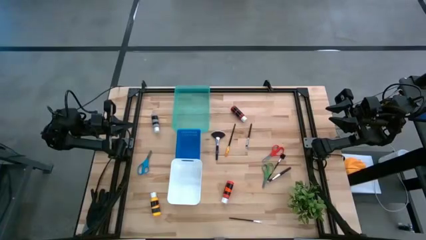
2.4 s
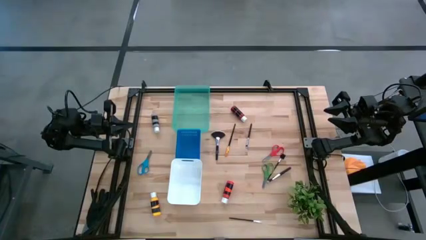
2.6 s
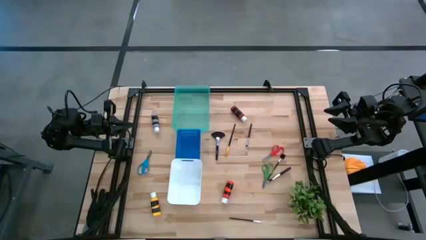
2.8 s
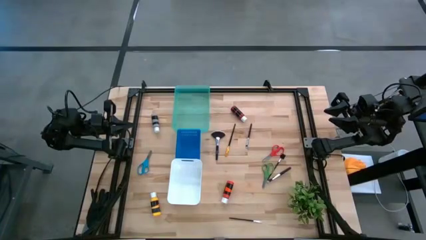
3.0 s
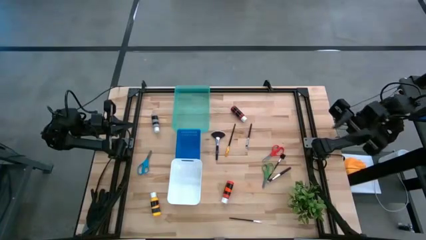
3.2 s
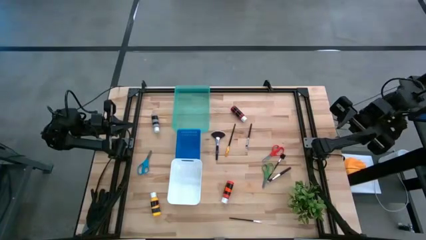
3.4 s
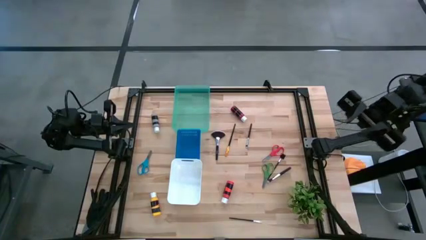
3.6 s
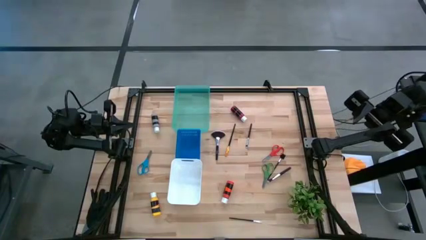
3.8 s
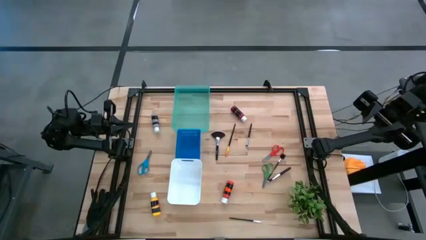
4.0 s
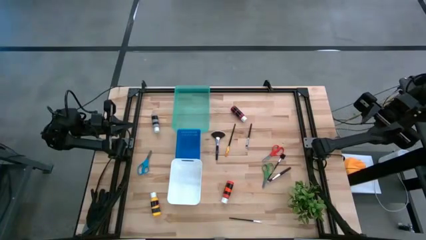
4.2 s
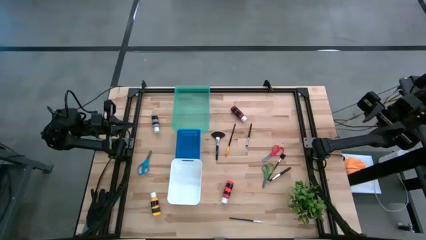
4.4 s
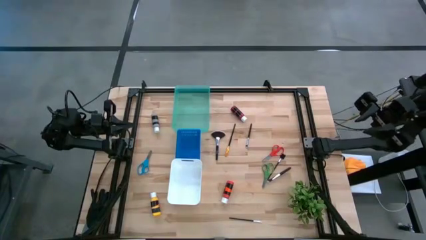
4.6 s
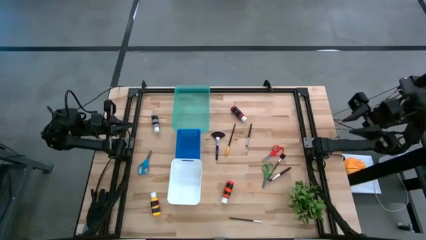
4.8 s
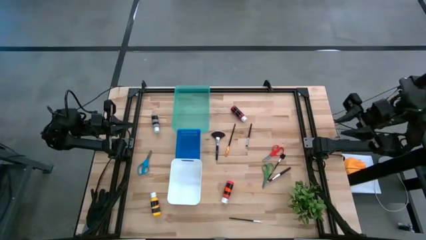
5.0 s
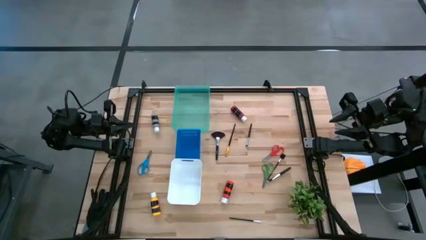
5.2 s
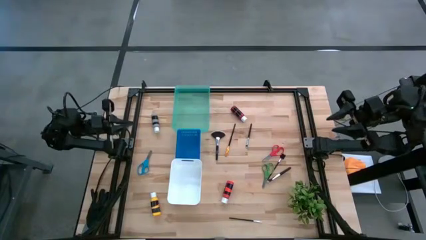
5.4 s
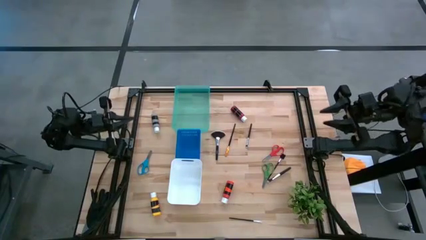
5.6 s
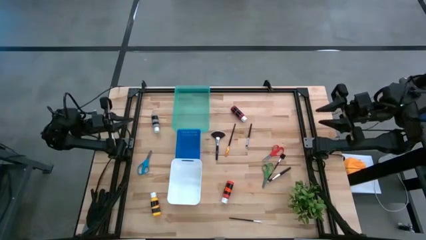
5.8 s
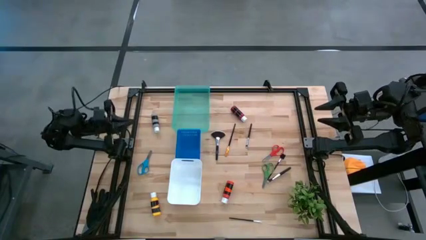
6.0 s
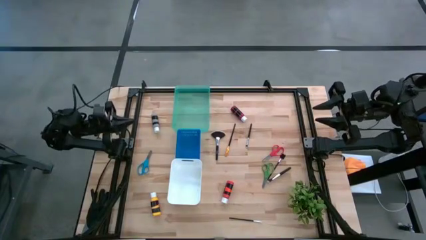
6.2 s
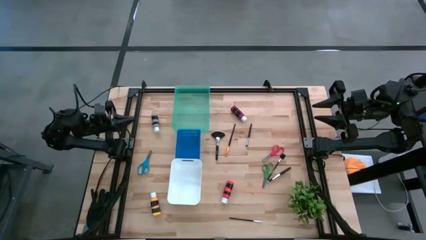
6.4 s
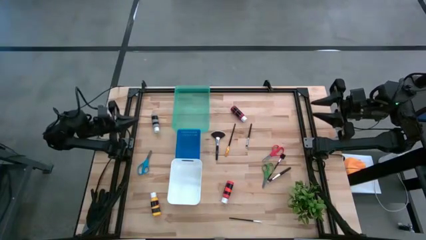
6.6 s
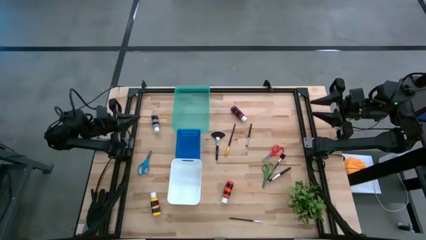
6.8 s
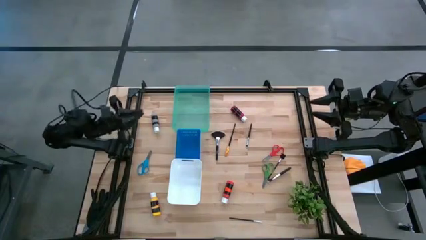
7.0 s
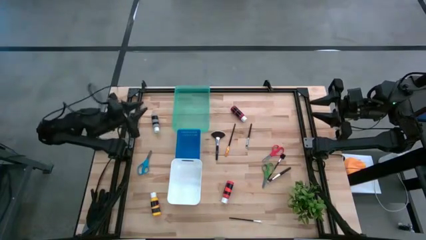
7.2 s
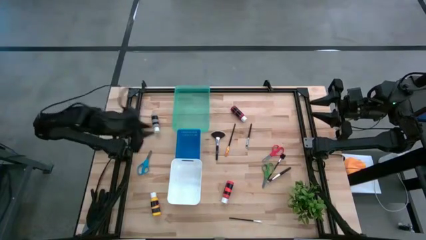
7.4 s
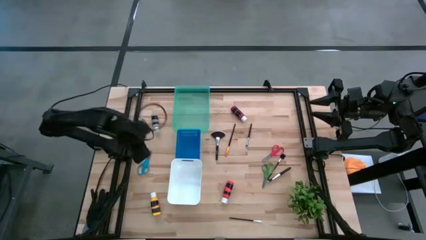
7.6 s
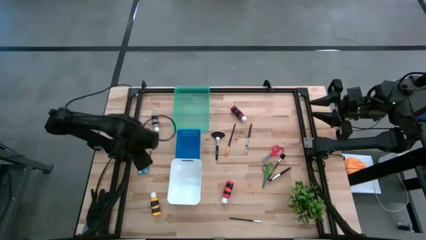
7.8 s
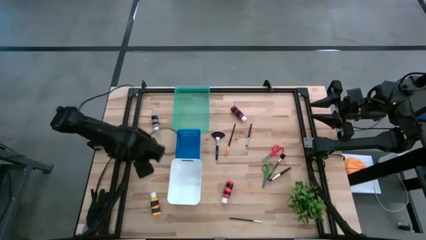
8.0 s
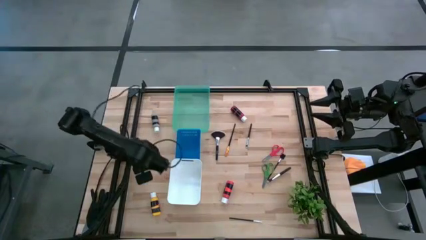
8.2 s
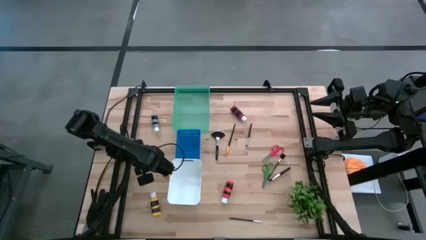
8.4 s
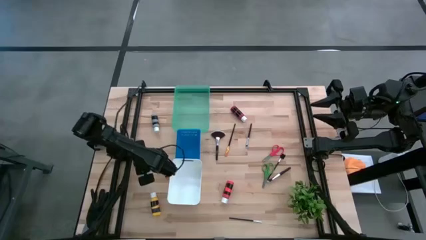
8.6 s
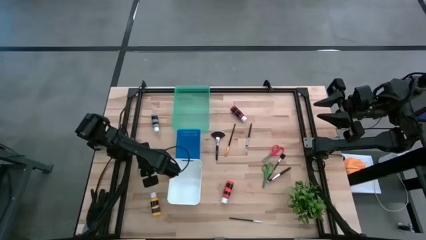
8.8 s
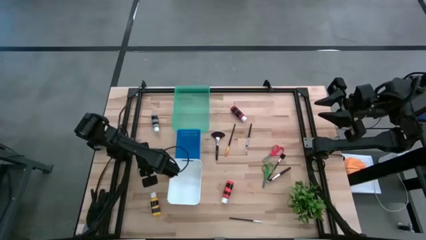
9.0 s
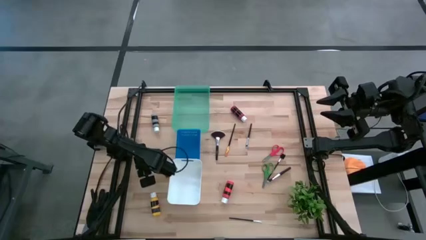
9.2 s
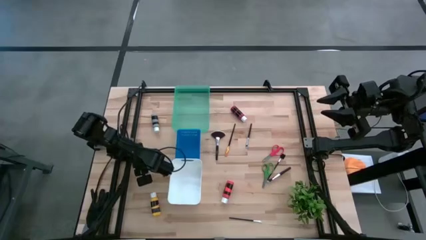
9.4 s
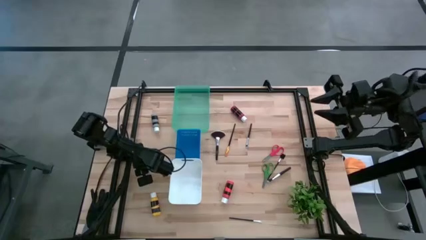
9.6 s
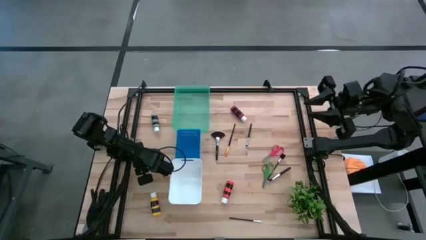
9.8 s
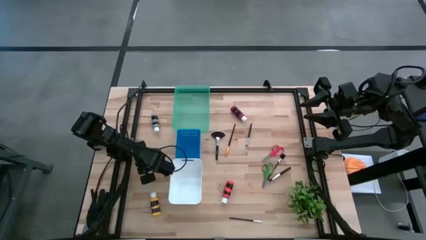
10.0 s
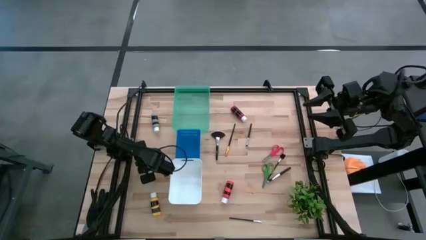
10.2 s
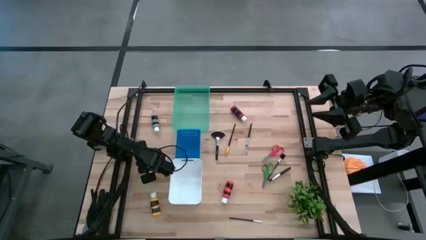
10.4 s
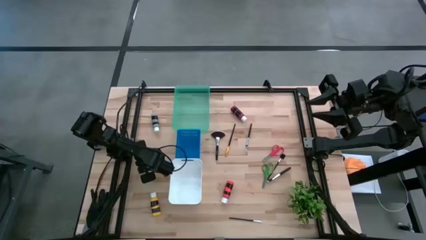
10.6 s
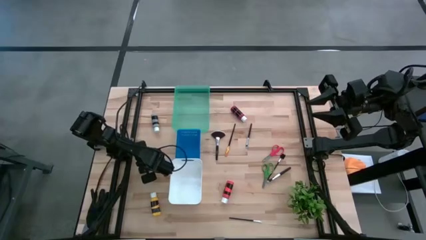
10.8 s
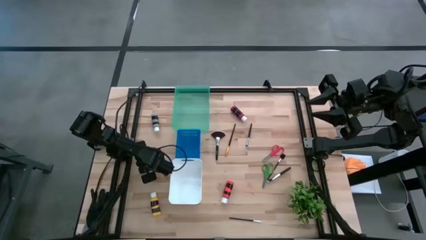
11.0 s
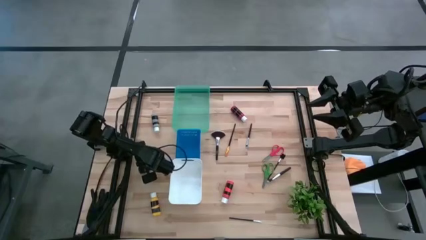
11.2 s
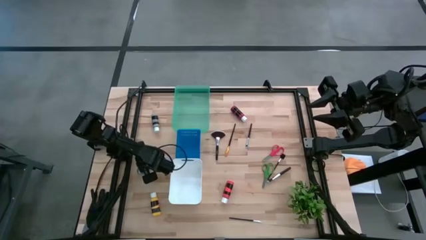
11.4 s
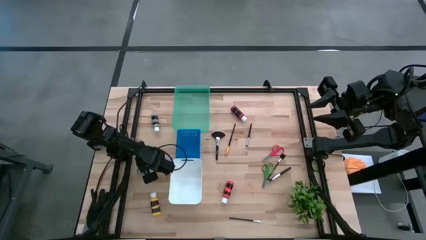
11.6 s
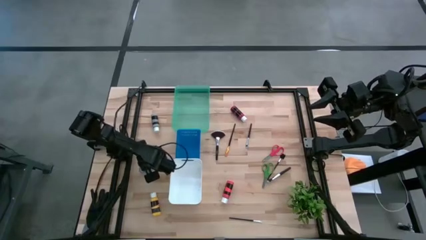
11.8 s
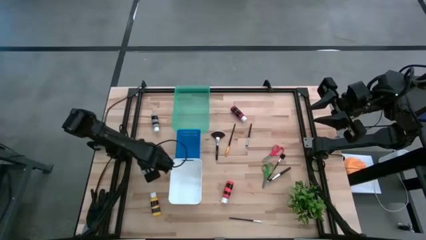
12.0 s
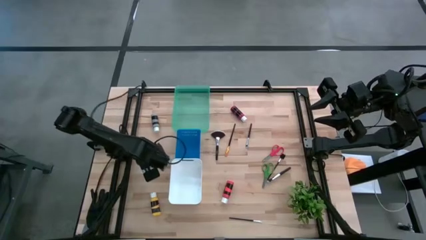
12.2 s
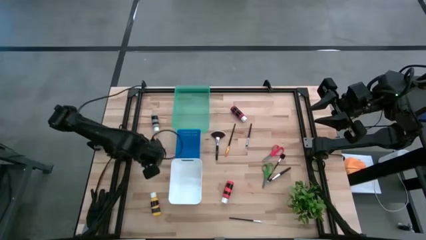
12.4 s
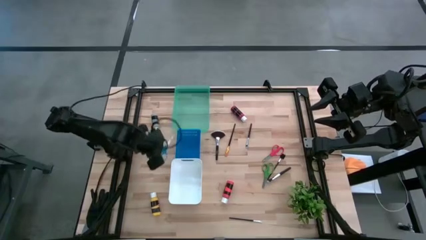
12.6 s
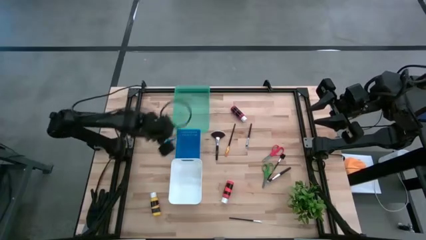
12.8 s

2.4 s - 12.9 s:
Task: Pick & Place Paint Supplies
Put the blue scissors into the green bin

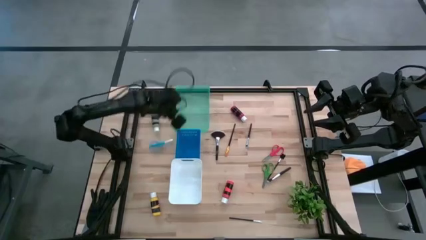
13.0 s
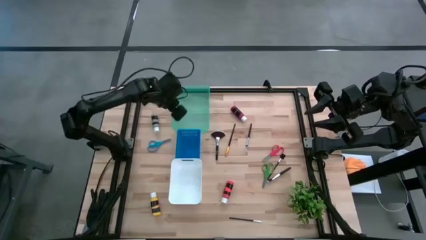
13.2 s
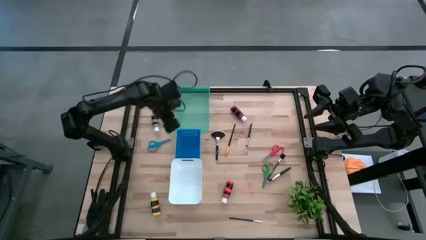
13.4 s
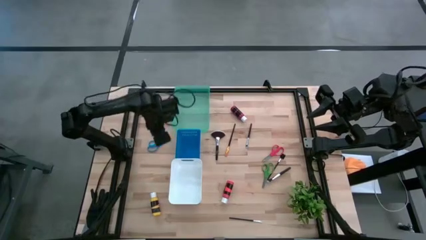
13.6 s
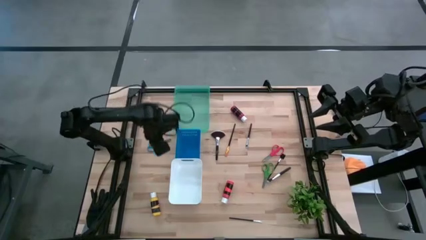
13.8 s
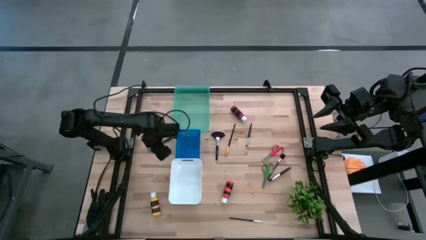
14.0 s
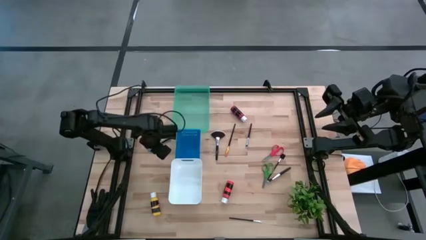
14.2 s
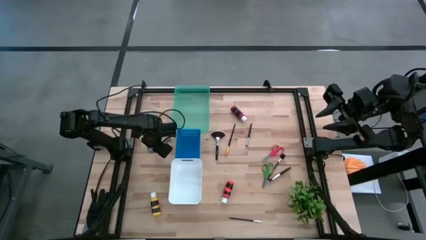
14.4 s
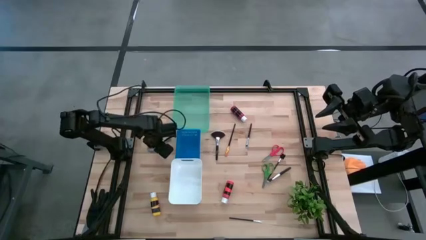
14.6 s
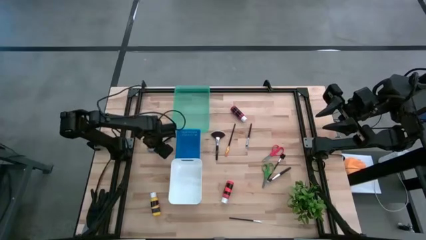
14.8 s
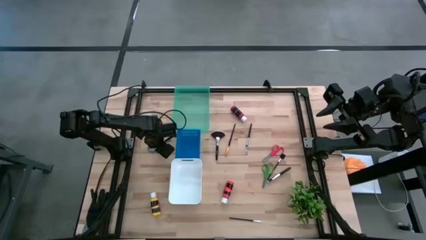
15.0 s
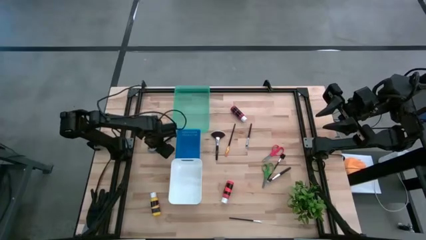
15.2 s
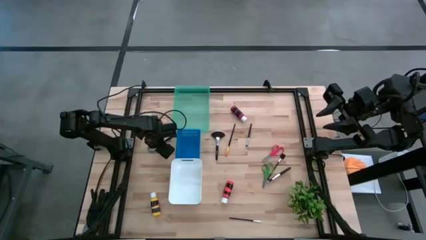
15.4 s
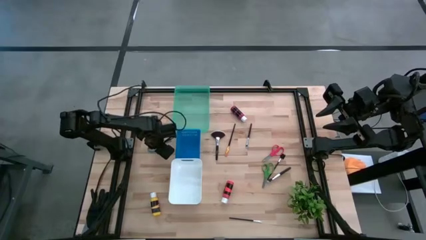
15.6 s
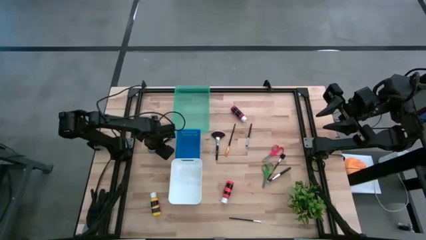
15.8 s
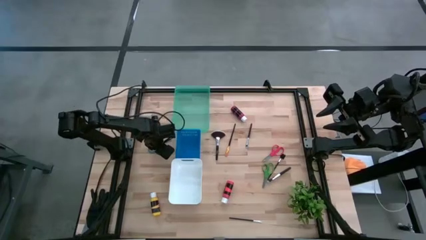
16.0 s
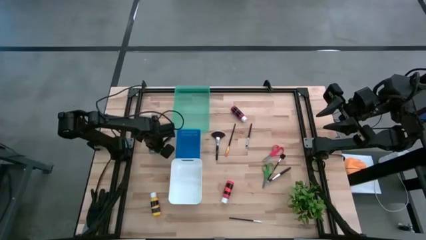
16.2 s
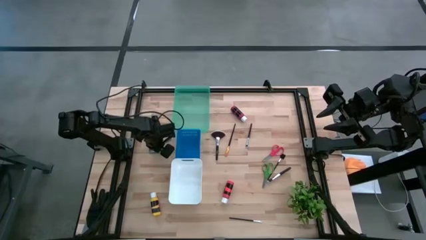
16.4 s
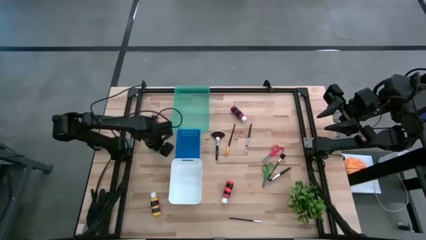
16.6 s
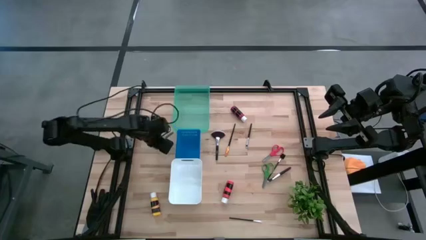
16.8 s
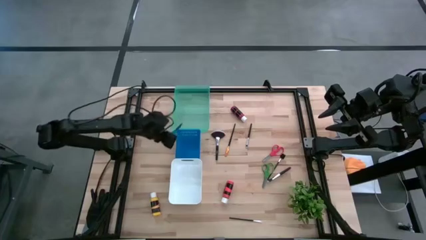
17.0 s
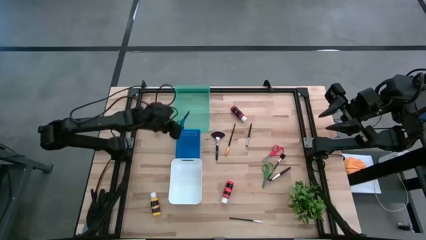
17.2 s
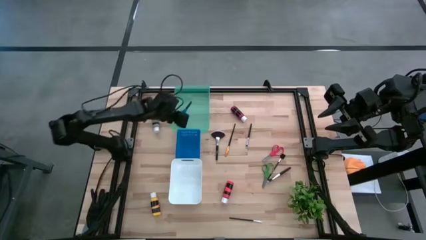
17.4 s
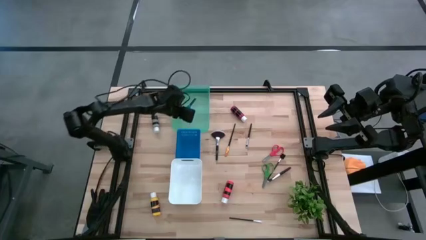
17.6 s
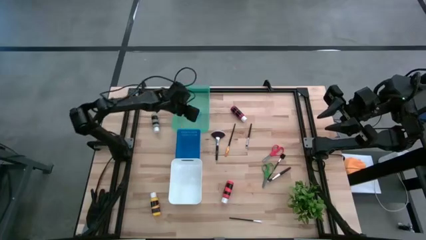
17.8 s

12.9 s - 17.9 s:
Put the blue scissors into the green bin
